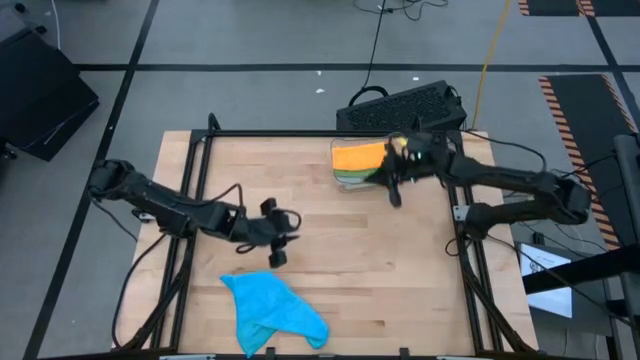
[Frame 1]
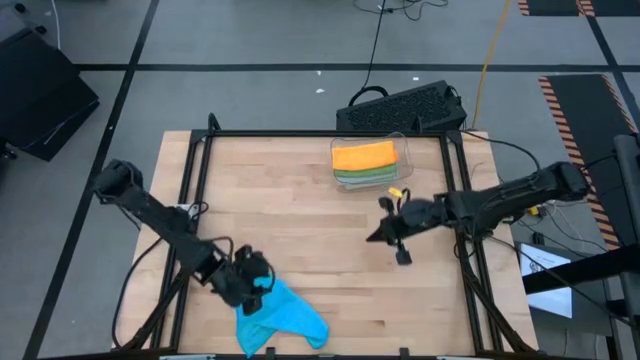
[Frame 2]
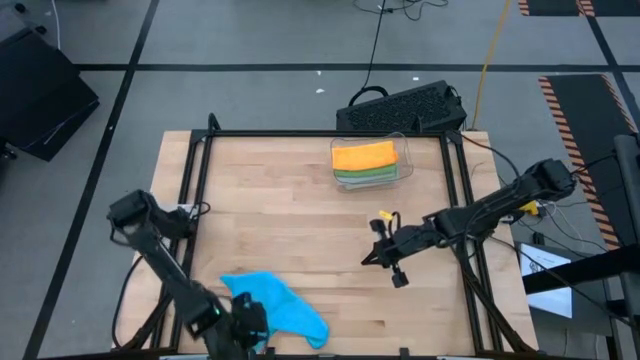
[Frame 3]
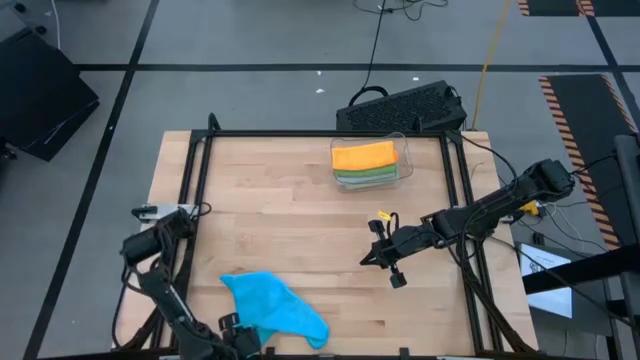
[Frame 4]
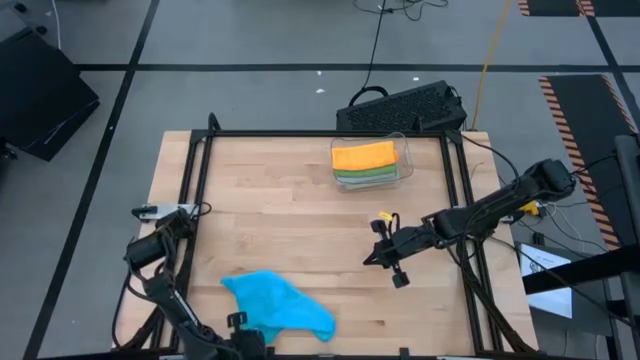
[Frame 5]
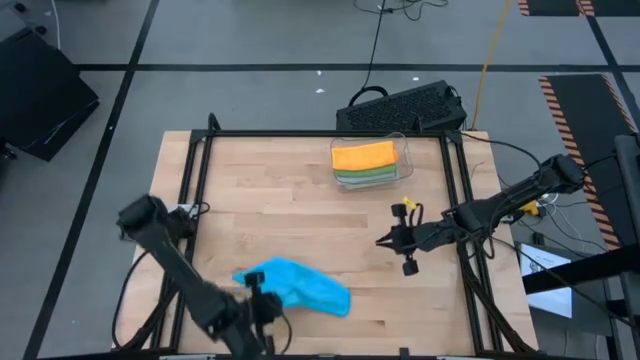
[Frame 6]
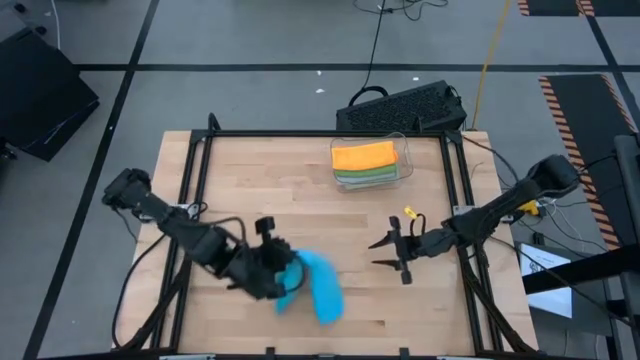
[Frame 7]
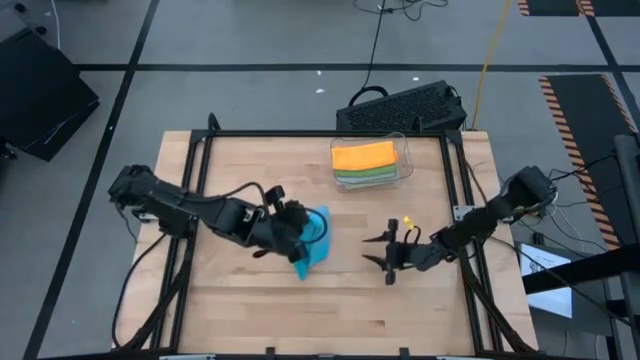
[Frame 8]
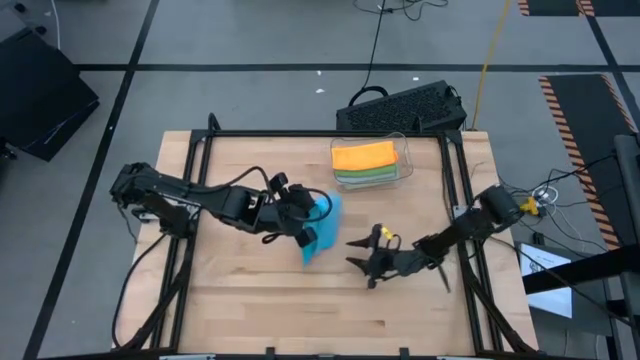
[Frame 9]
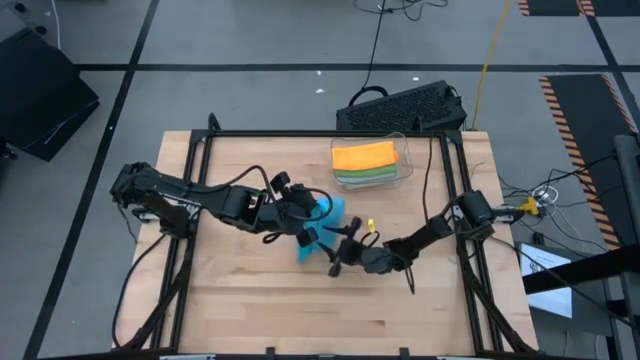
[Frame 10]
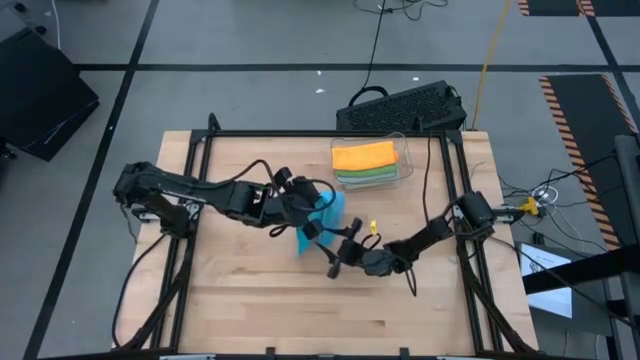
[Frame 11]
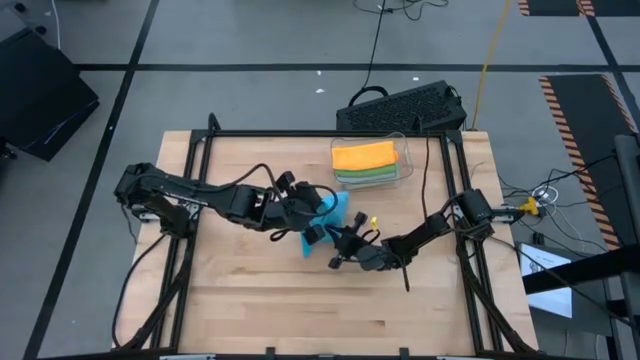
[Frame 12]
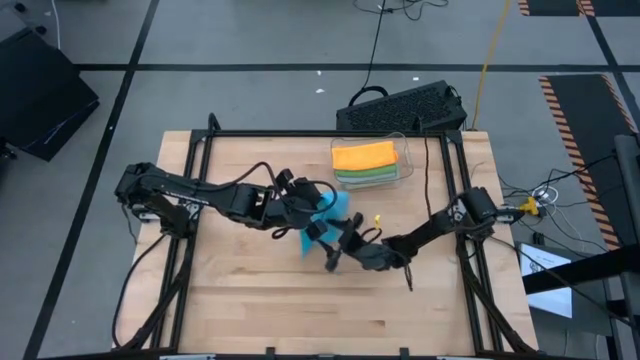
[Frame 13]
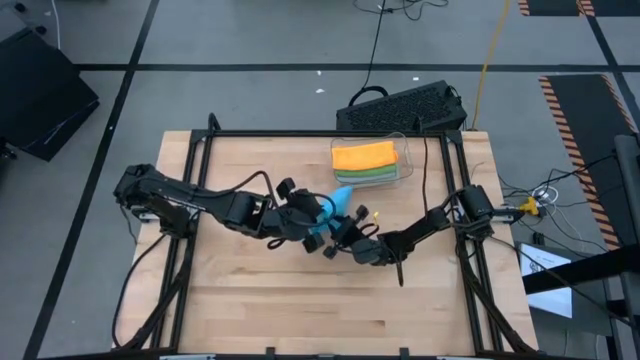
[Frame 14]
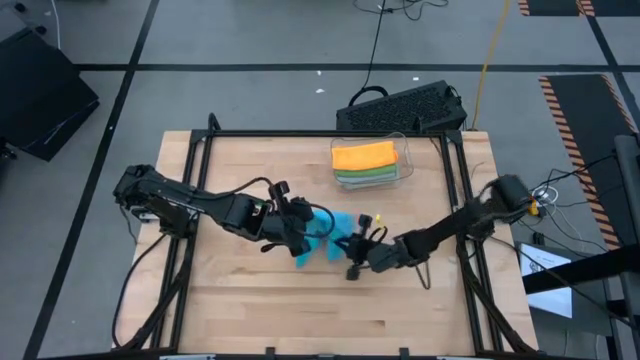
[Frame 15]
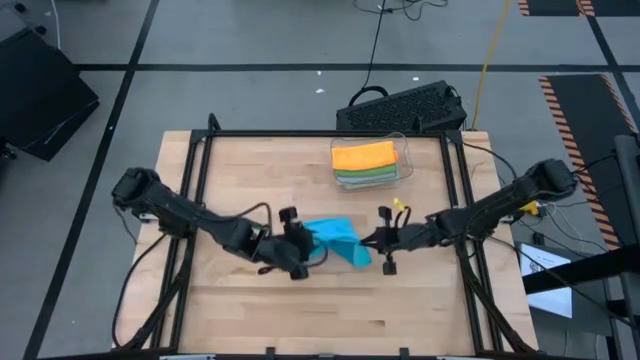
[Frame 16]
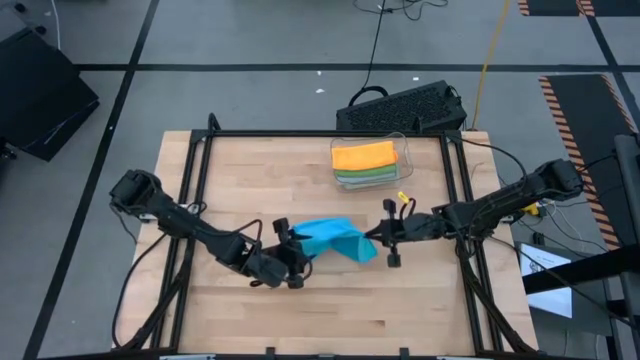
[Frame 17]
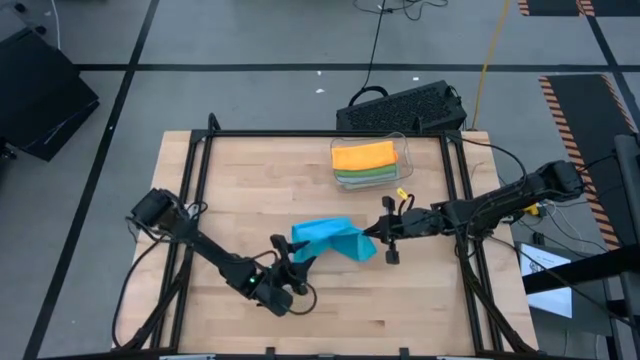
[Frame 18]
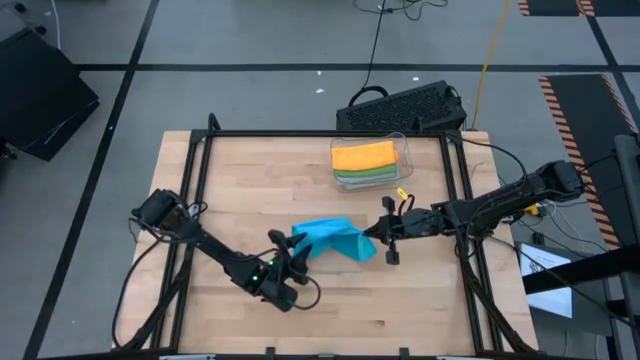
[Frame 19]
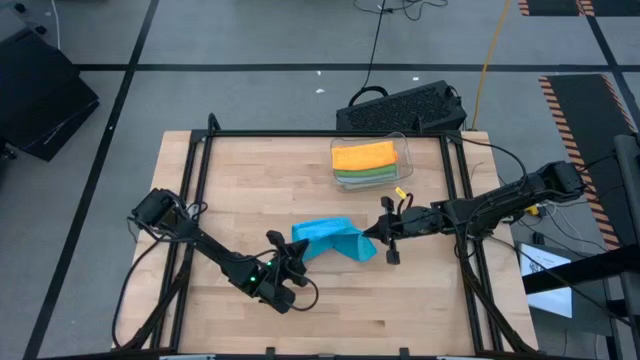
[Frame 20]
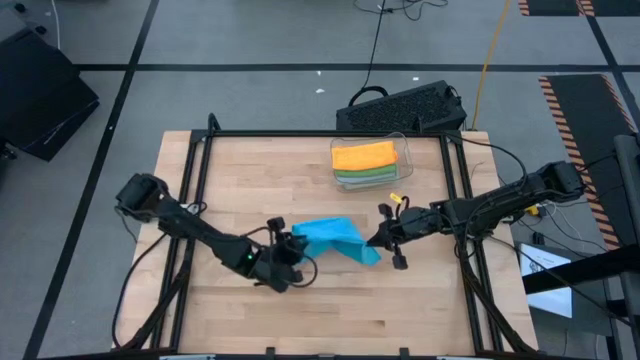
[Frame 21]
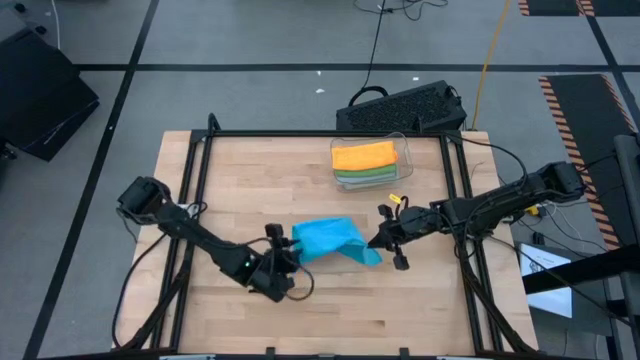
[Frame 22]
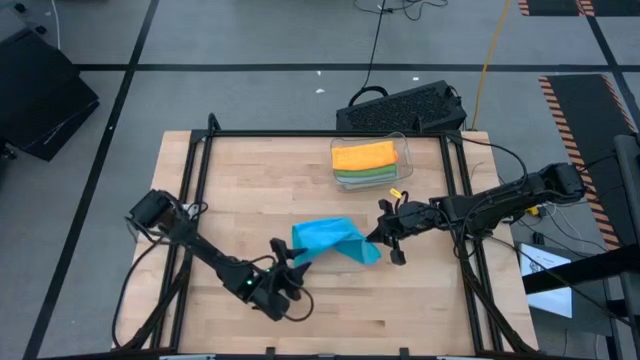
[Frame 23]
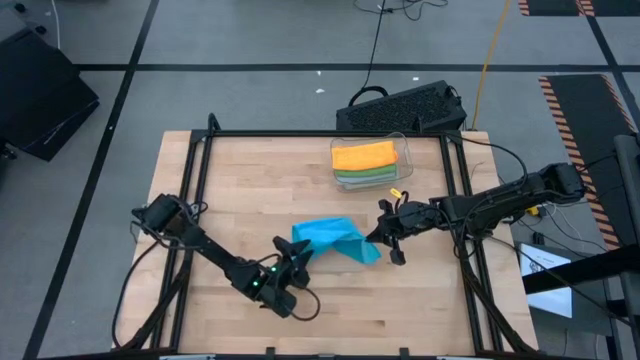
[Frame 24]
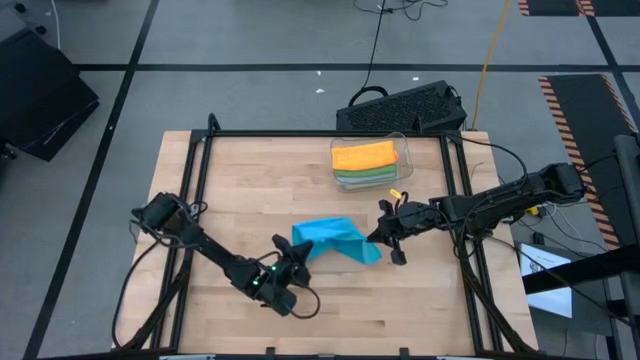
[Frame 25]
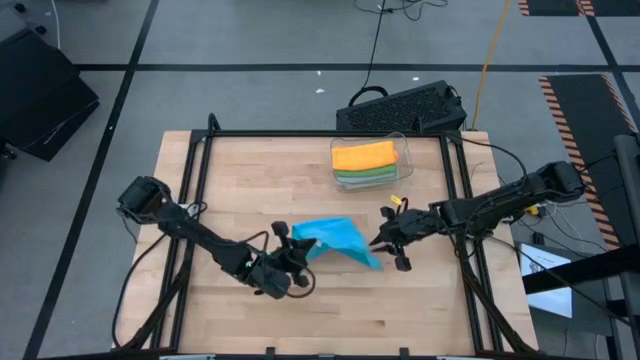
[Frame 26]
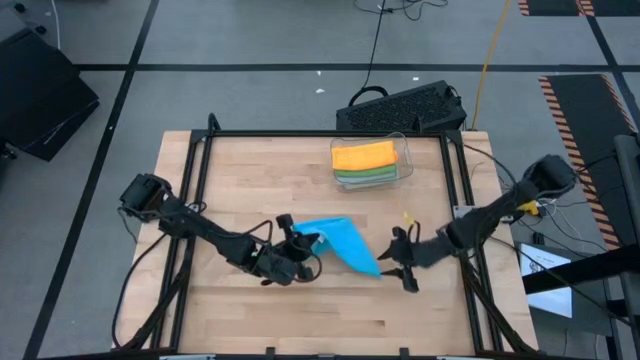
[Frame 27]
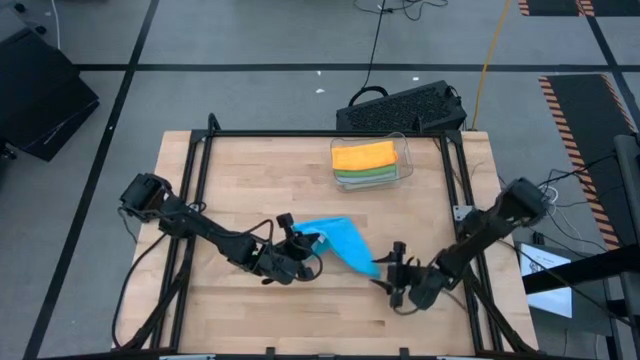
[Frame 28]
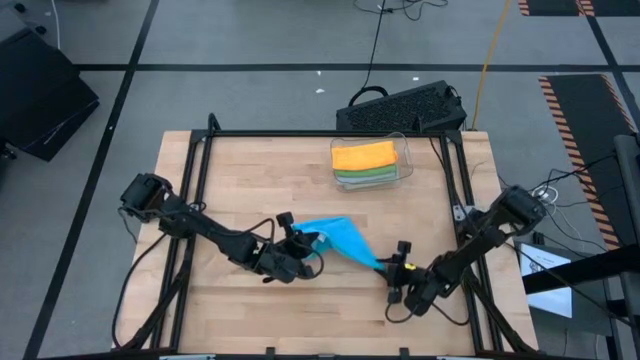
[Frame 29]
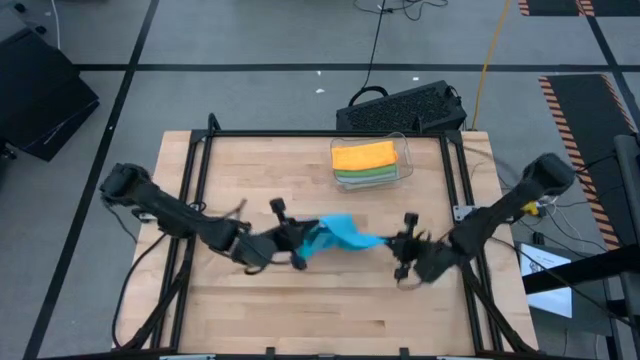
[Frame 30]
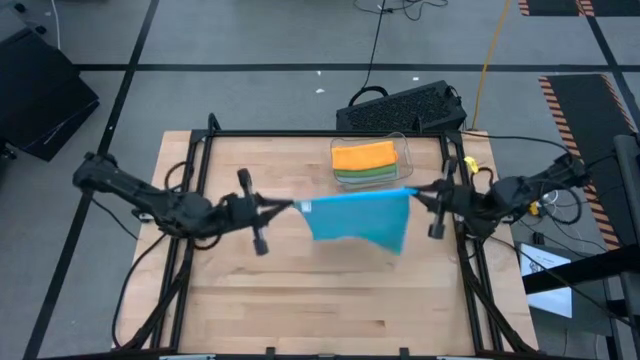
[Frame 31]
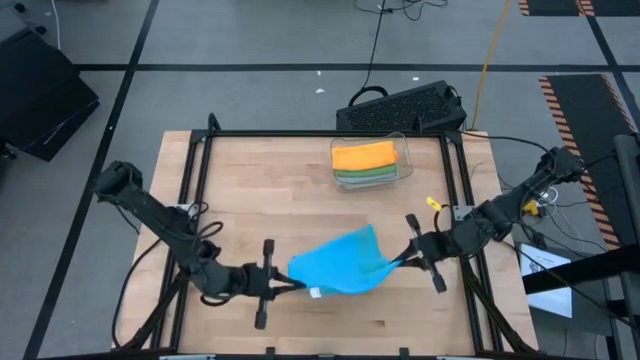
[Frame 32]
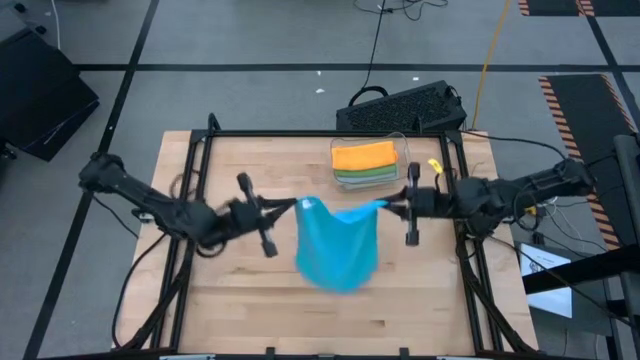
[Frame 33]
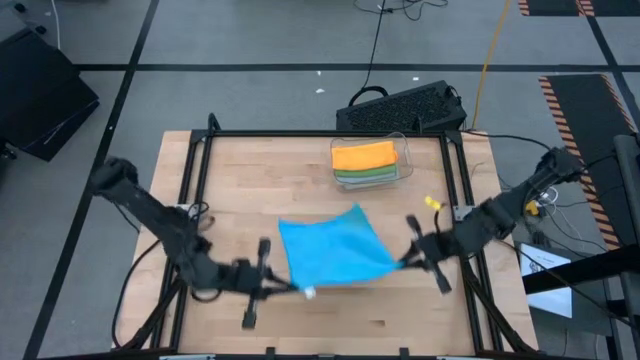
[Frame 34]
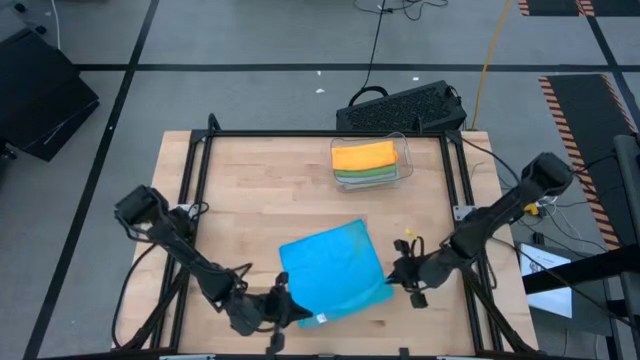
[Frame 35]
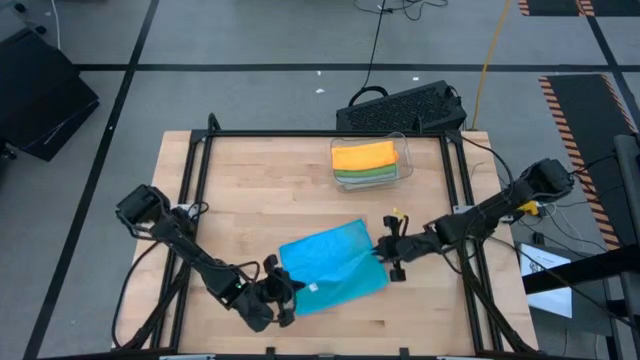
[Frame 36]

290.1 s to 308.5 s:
Task: Fold microfiber towels
Fold the blue microfiber towel

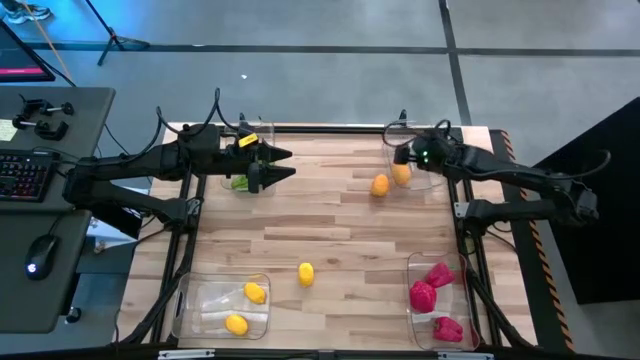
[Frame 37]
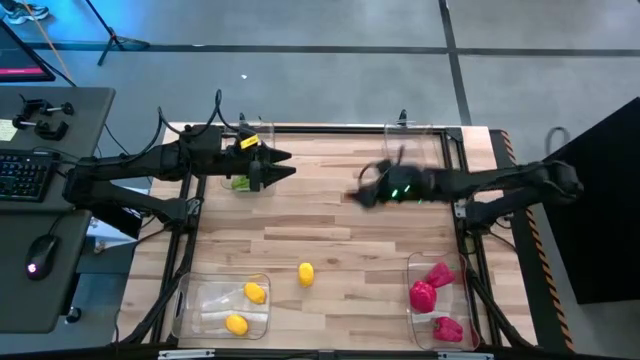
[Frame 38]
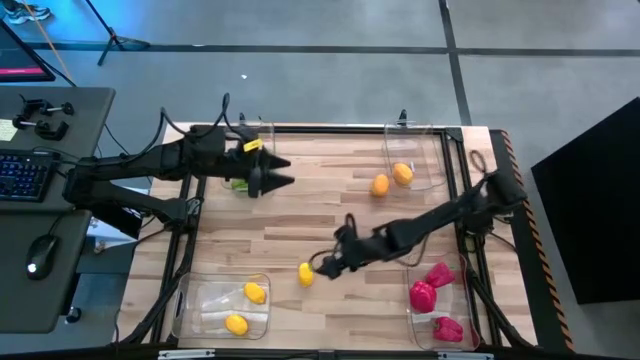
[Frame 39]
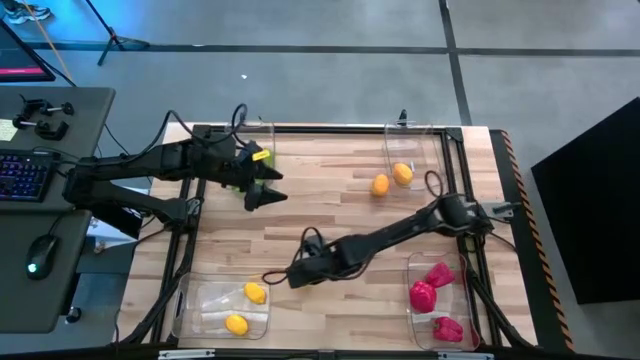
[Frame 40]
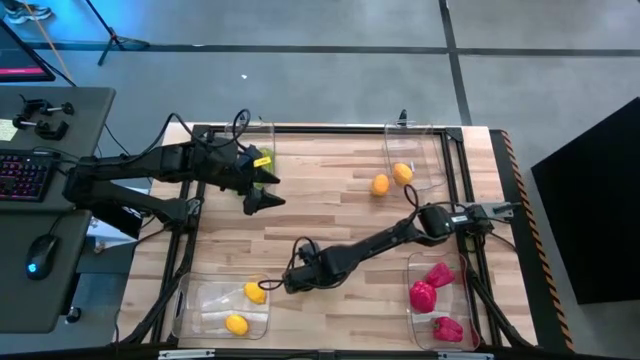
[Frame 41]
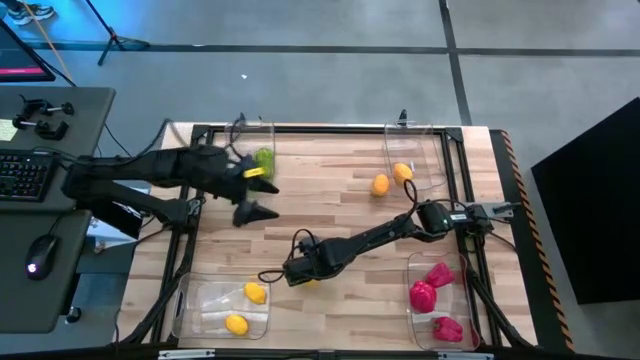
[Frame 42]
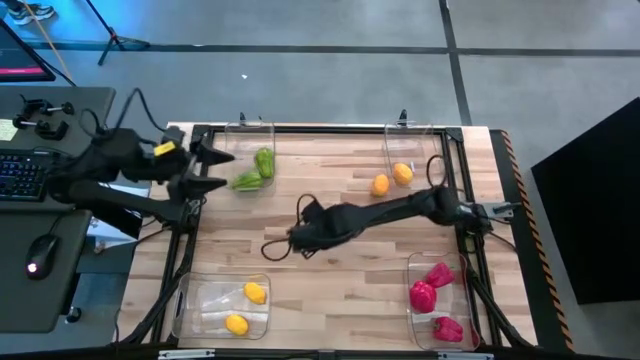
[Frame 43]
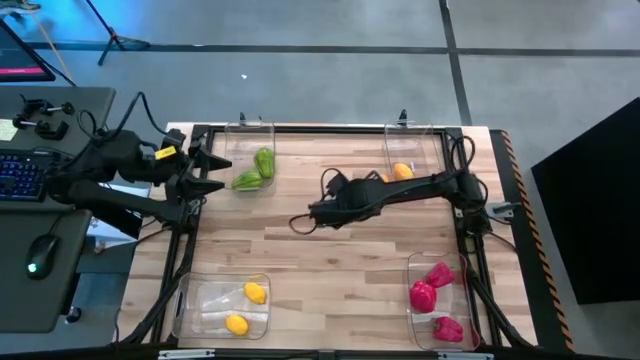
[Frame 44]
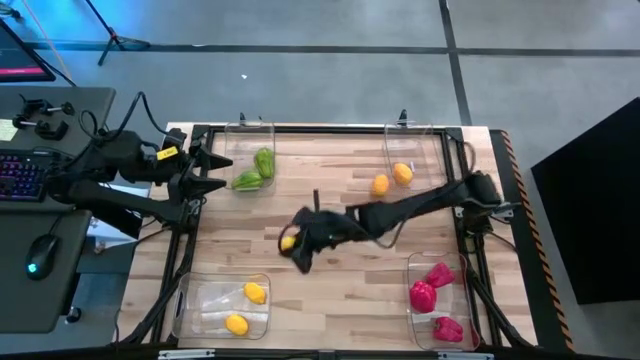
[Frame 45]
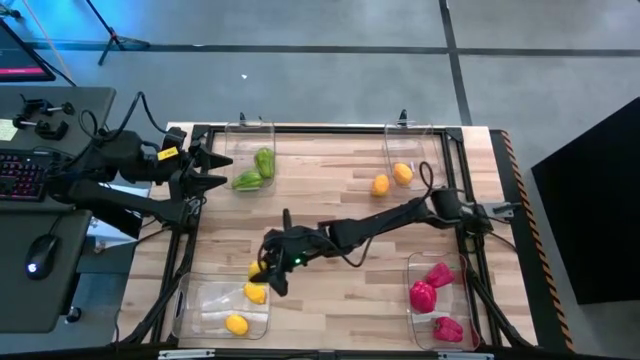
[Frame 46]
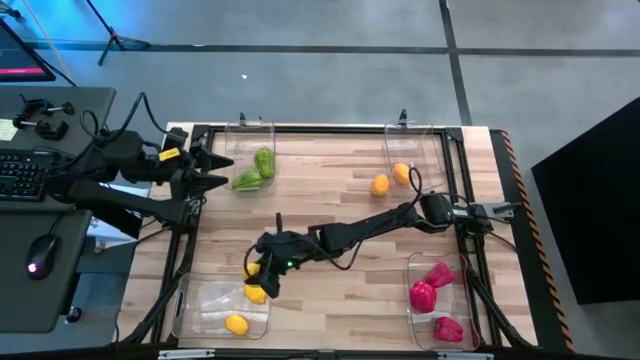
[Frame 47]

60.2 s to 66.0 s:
Task: Sort produce into baskets
Put the lemon into the bottom left transparent bin
